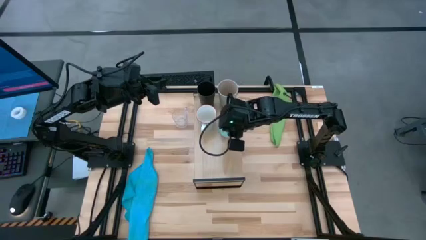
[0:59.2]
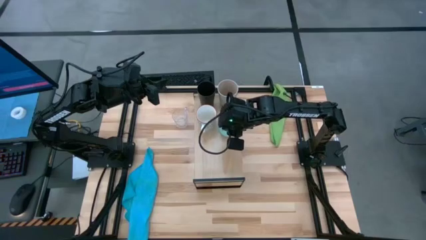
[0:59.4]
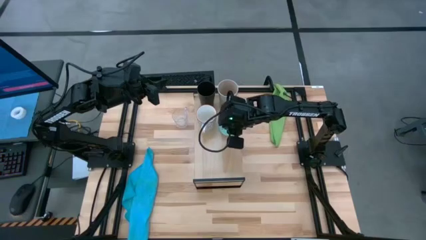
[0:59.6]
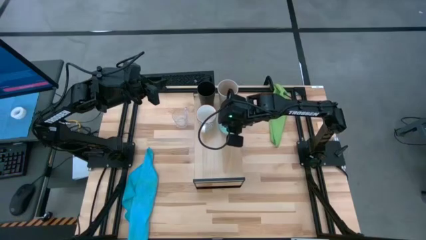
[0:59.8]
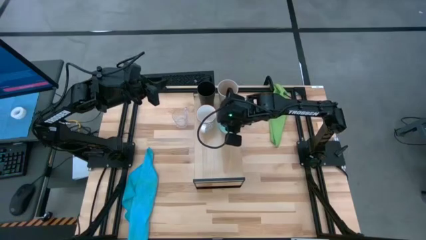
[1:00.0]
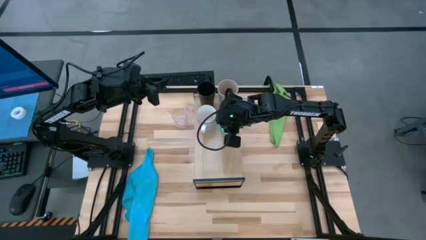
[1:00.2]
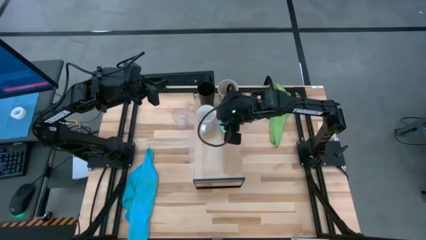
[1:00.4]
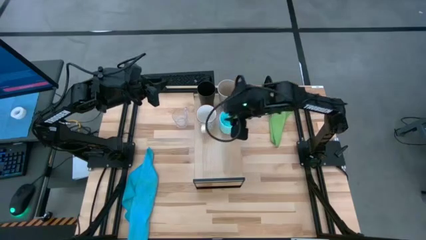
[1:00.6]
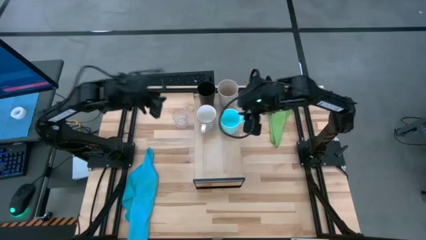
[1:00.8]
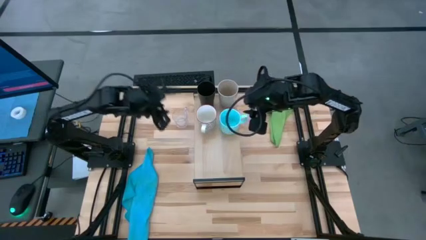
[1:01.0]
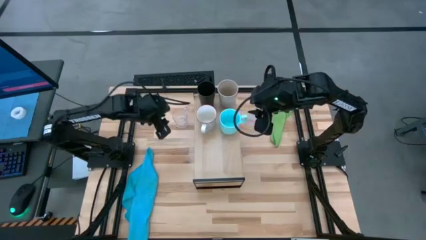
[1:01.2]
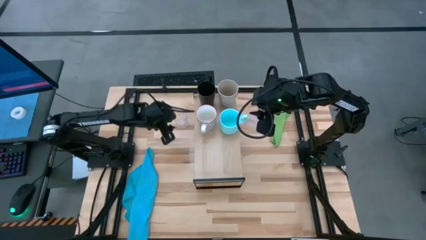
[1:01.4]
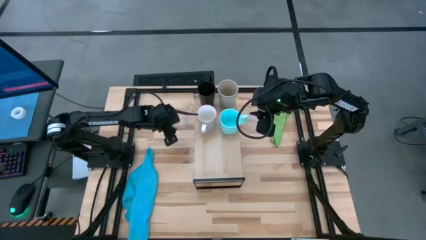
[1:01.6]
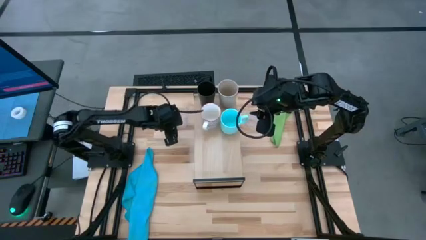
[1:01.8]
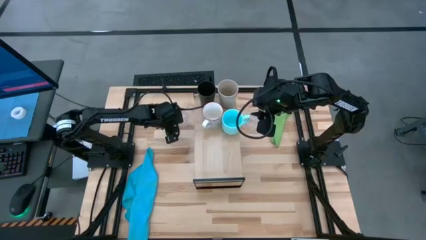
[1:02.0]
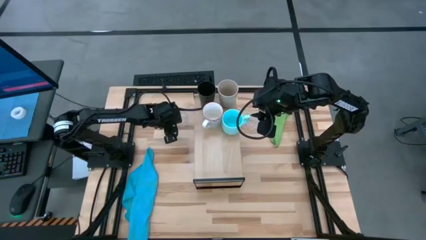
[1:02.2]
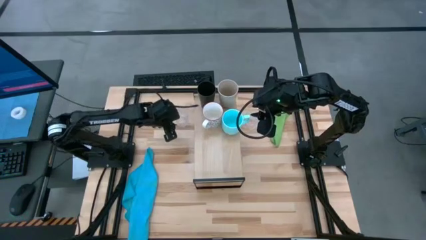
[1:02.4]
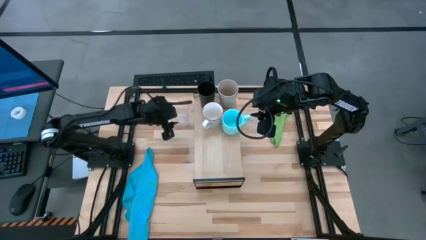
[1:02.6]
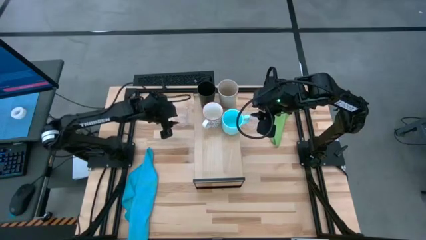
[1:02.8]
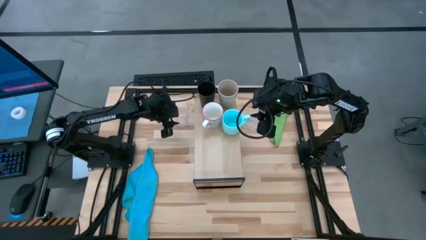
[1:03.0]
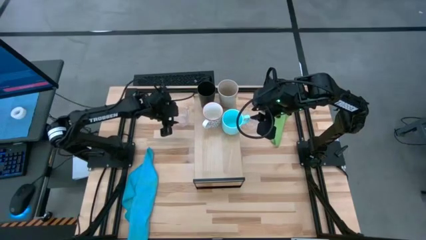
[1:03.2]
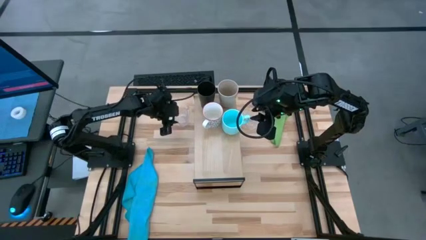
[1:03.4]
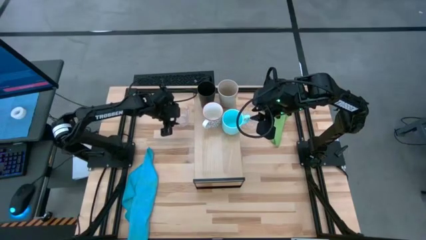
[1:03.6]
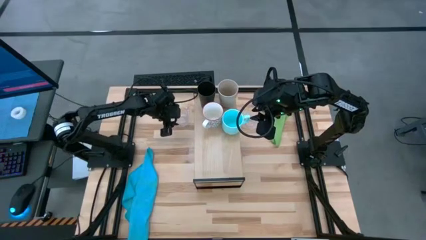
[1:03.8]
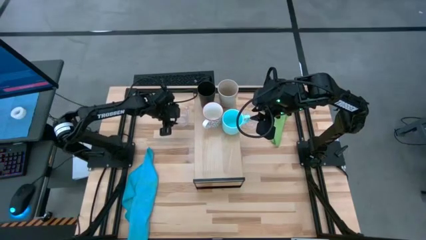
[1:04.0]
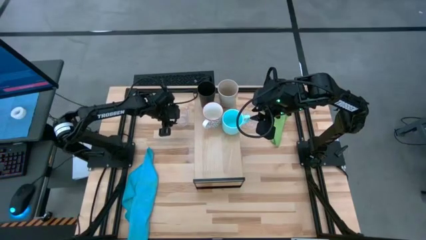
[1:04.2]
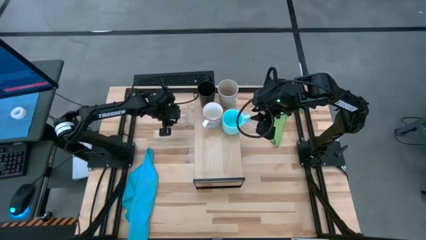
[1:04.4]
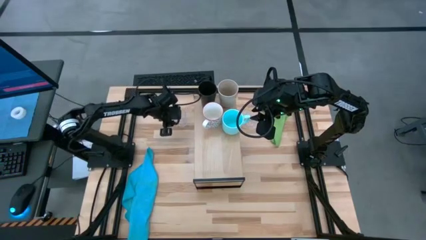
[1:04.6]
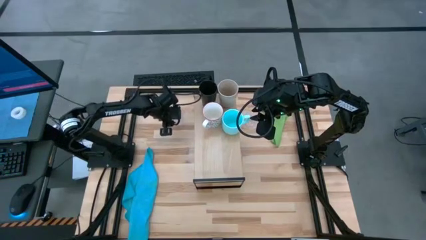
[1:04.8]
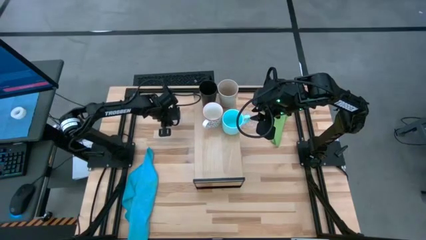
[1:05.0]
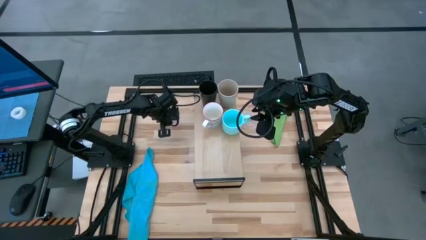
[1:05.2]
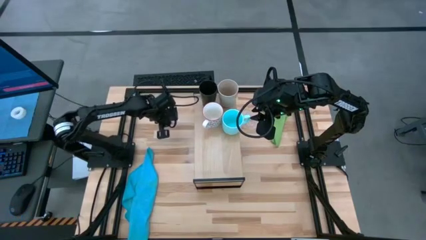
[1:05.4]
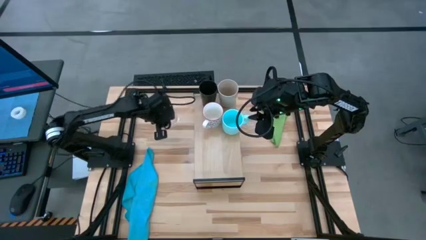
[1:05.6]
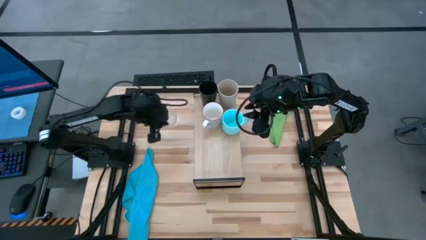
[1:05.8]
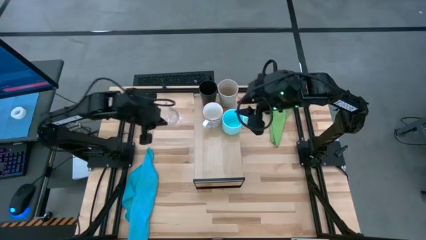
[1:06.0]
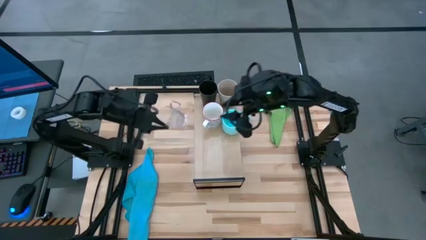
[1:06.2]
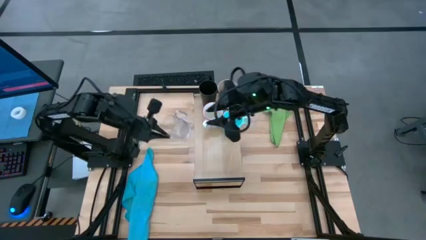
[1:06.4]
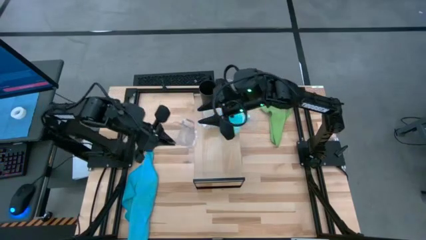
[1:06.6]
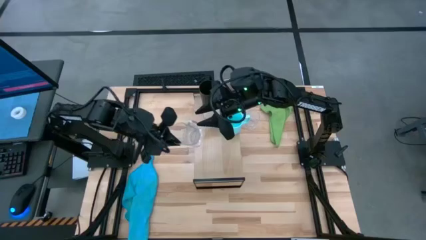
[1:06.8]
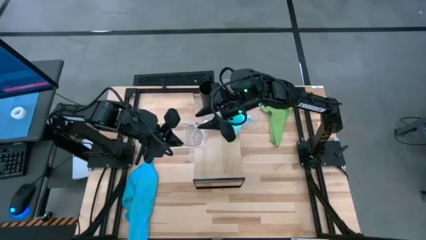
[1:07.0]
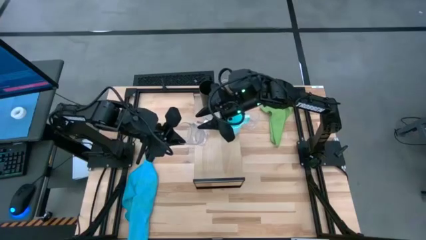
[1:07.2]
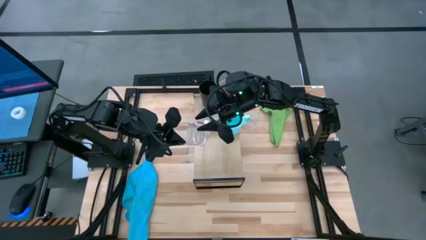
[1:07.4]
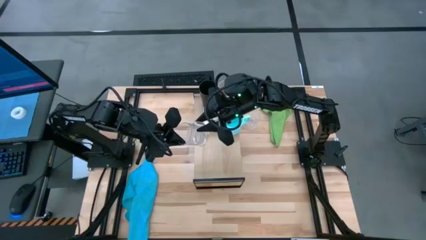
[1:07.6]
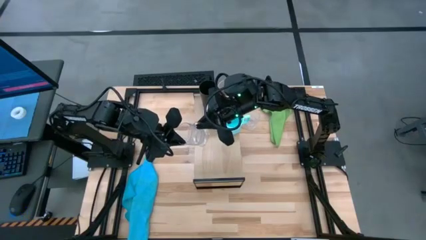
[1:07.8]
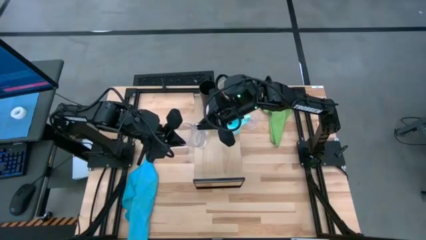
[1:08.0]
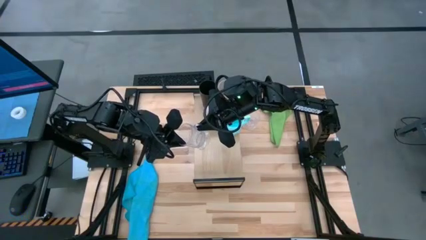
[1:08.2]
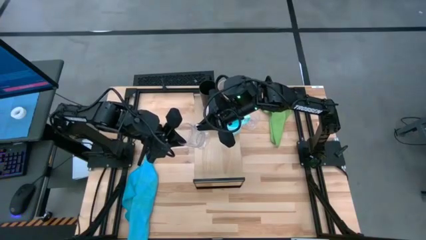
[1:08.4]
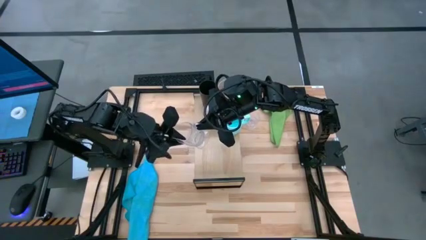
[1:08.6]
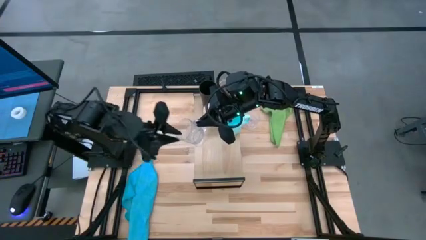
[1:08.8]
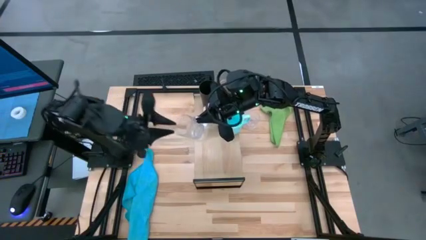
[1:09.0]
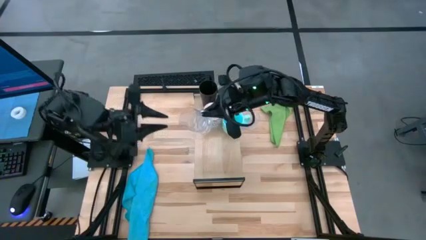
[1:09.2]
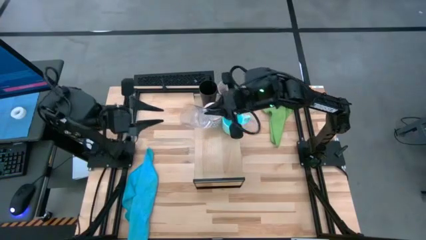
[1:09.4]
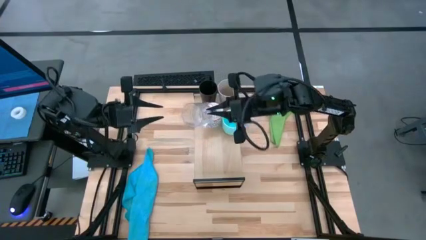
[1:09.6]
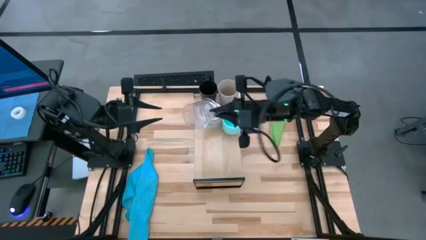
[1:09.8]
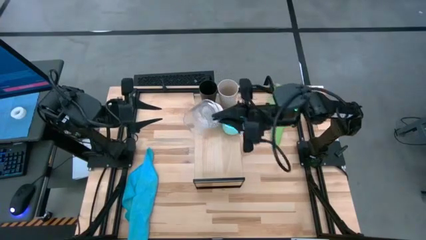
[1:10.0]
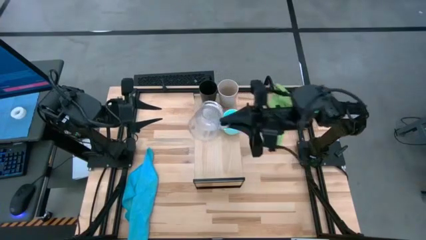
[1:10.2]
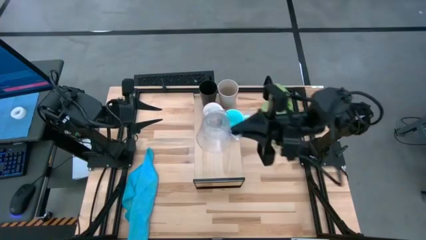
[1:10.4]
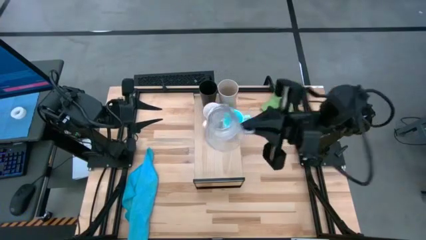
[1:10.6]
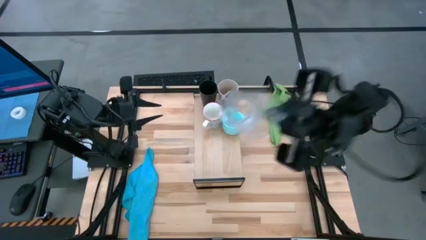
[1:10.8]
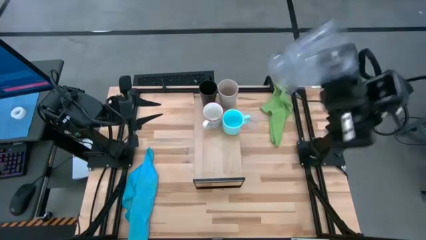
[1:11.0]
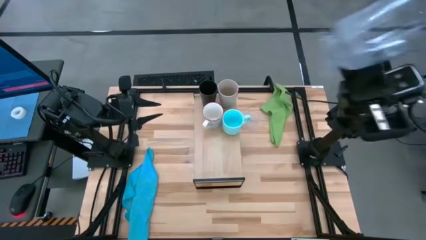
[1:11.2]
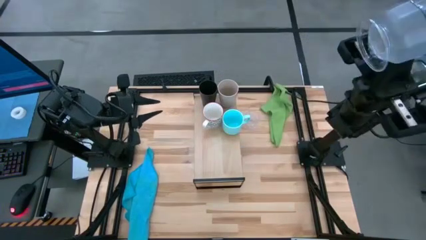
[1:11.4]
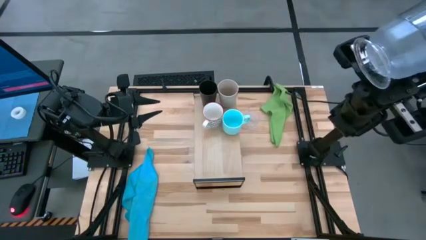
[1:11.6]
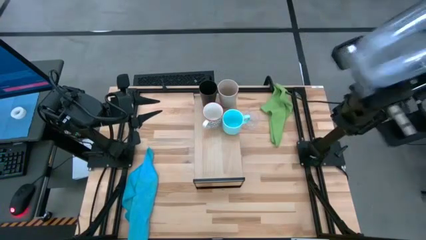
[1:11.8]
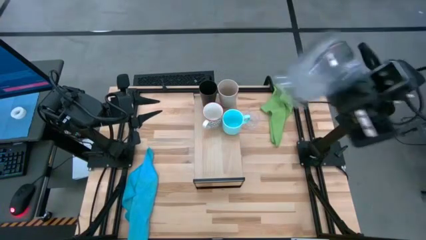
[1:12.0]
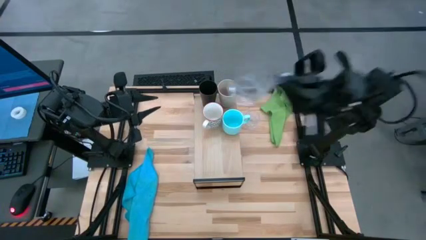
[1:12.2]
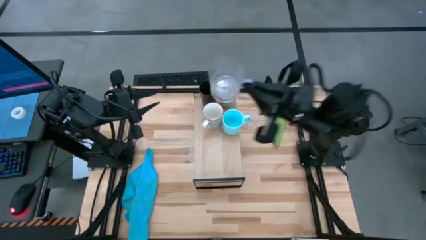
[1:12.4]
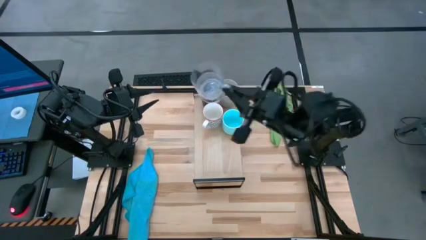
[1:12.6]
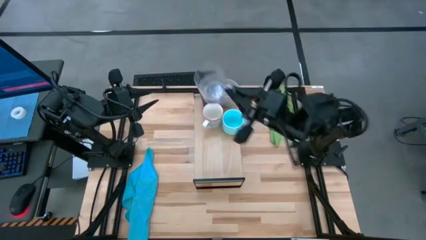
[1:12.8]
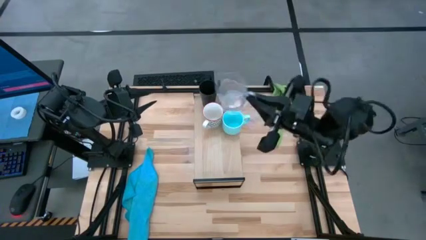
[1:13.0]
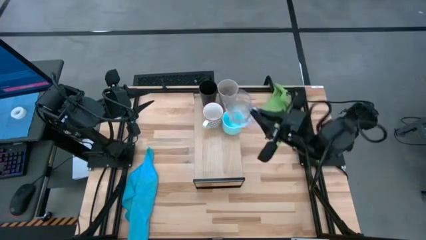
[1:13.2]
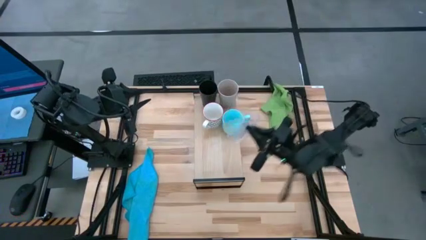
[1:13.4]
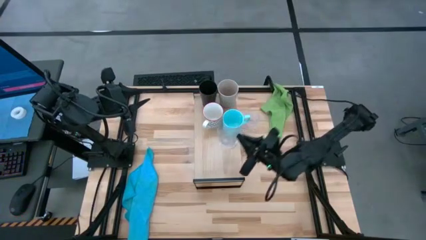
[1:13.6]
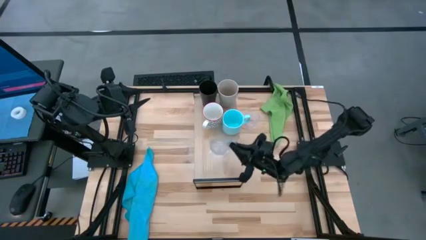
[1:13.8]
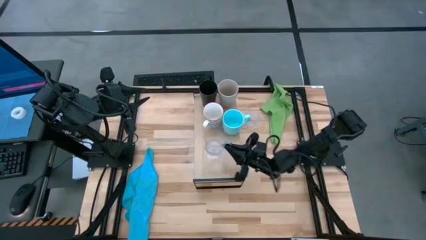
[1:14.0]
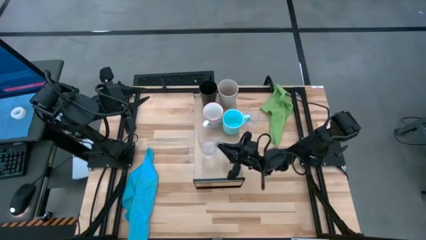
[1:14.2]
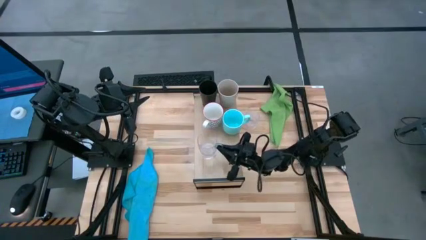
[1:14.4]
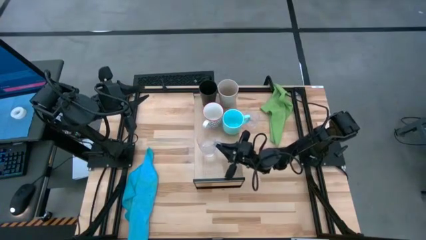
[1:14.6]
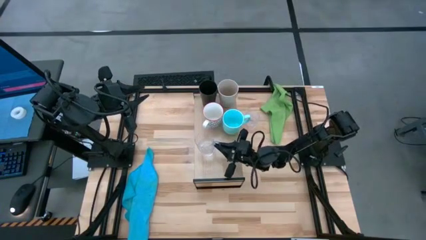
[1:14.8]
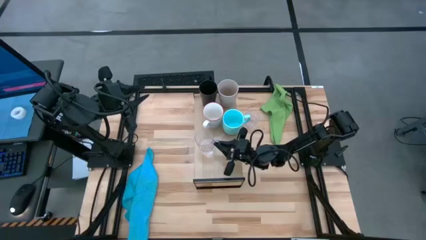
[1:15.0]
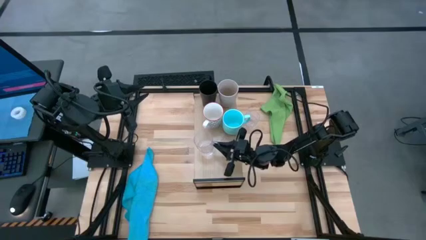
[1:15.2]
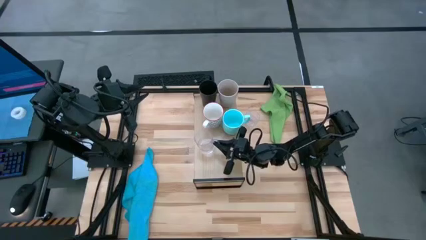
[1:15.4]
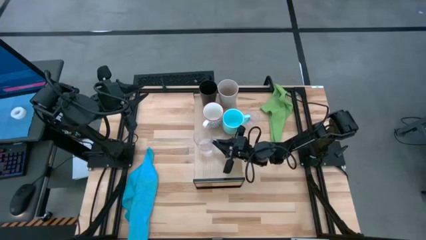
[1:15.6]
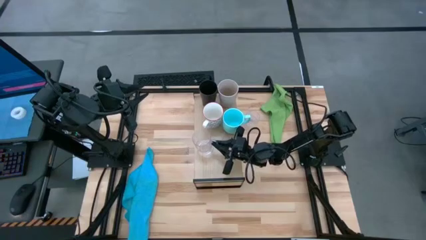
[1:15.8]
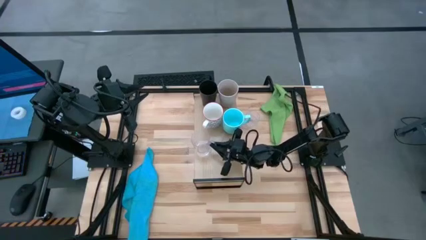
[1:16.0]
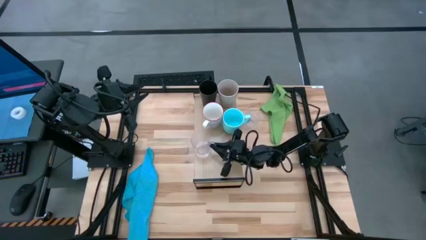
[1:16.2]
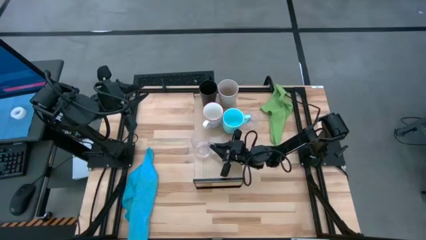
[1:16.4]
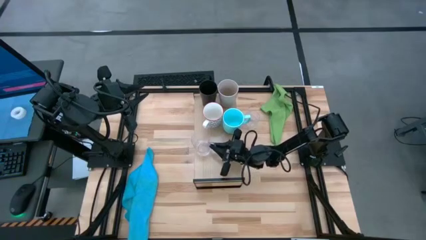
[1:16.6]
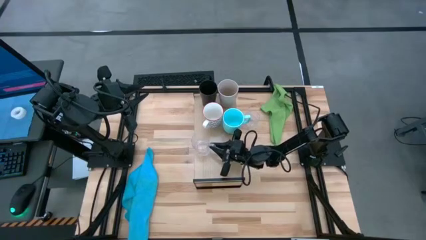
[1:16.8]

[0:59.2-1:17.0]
Task: Stack small to large cups/mugs on shelf
Put the left transparent cup on the shelf

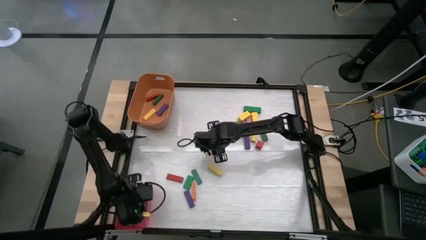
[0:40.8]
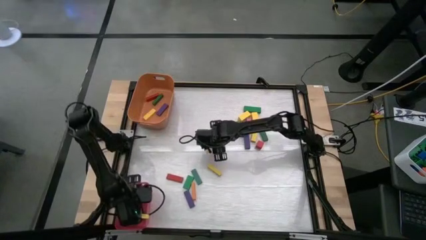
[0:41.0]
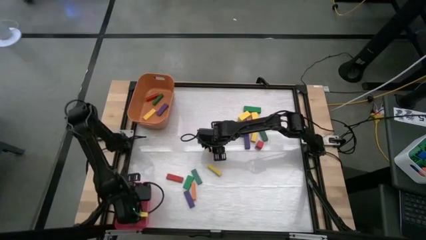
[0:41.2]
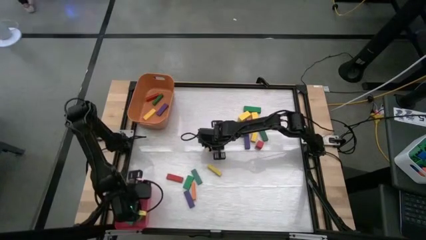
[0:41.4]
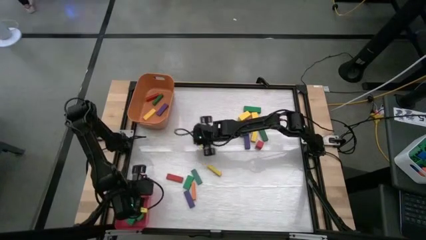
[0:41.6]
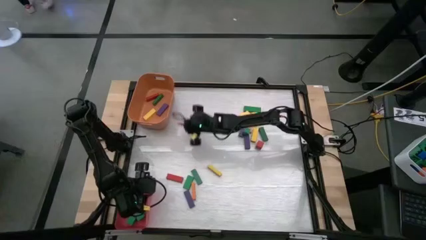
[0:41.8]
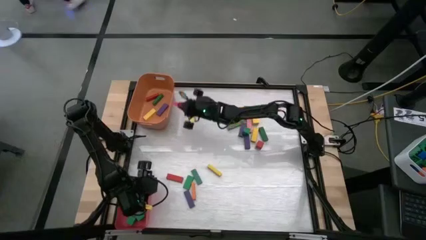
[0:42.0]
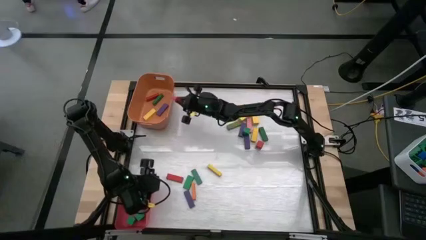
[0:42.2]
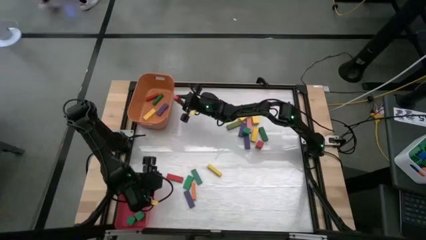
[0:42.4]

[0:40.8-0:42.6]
Task: Sort blocks by size
Put the big red block into the orange bin
